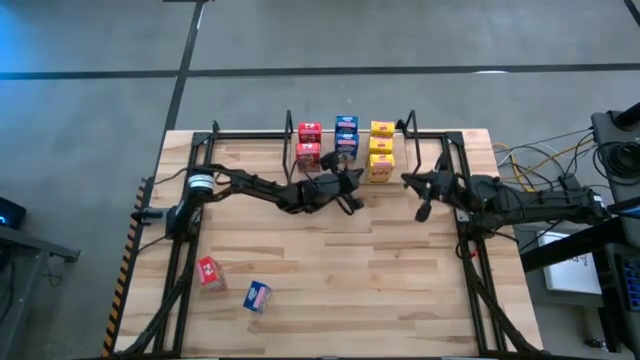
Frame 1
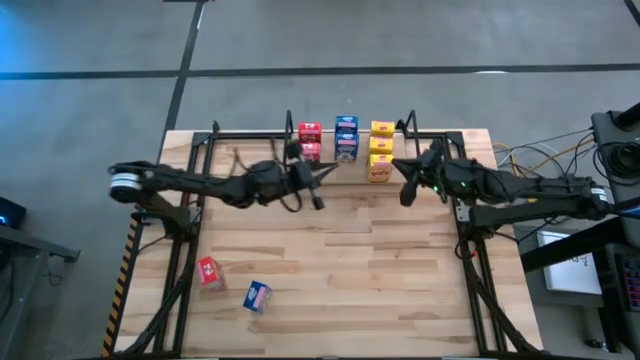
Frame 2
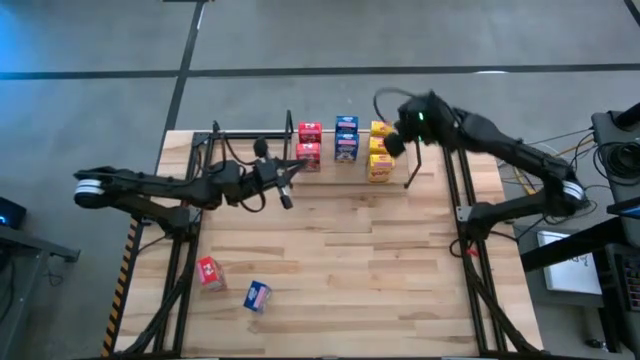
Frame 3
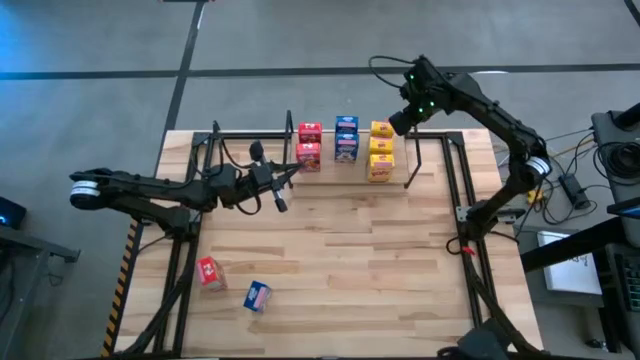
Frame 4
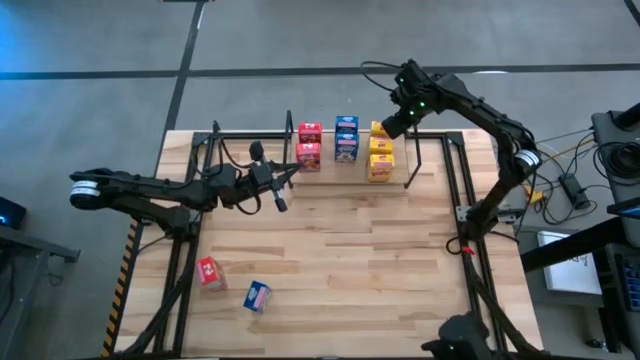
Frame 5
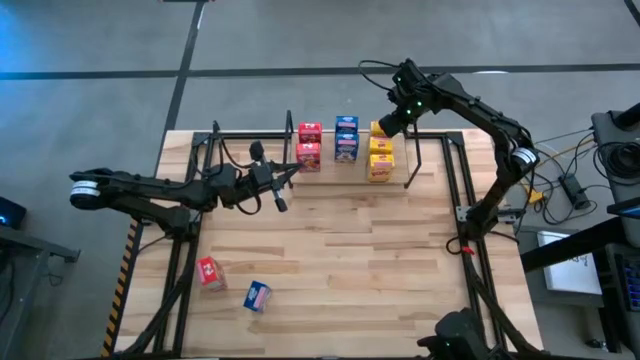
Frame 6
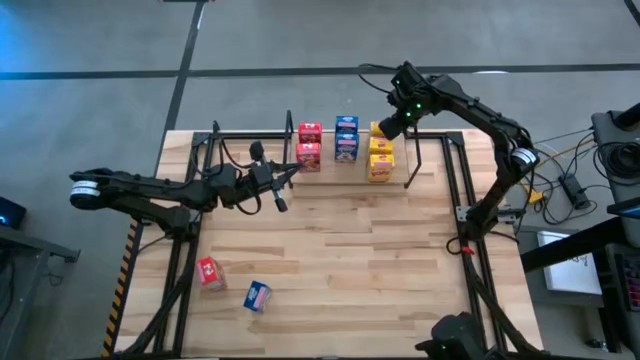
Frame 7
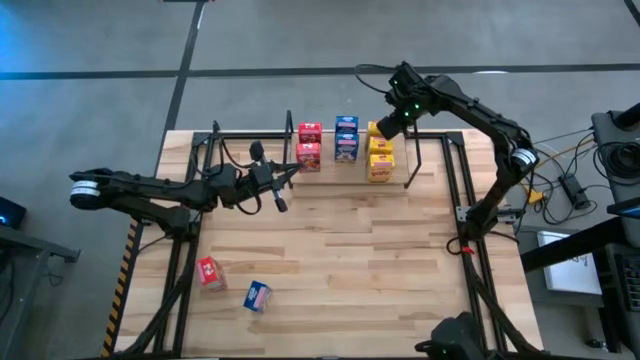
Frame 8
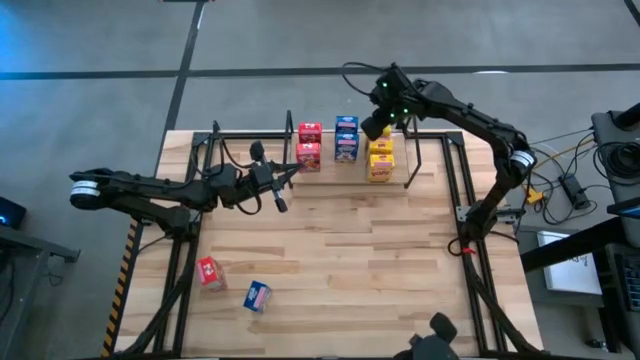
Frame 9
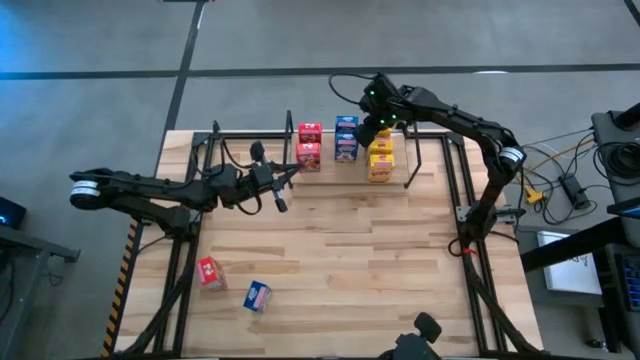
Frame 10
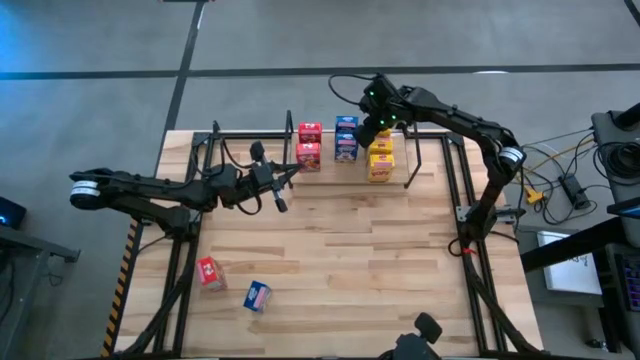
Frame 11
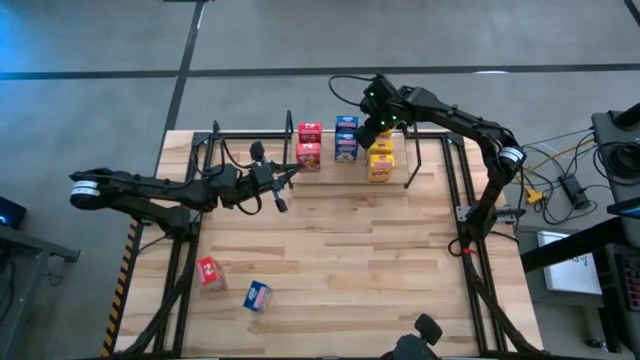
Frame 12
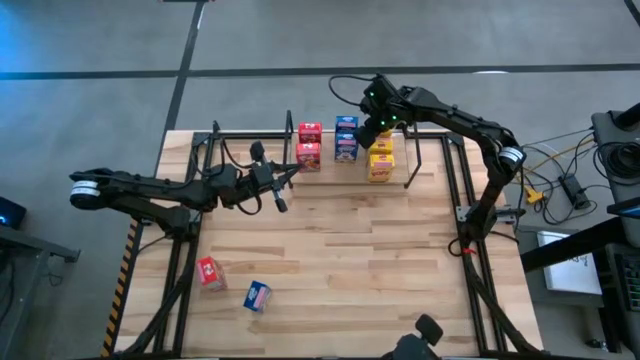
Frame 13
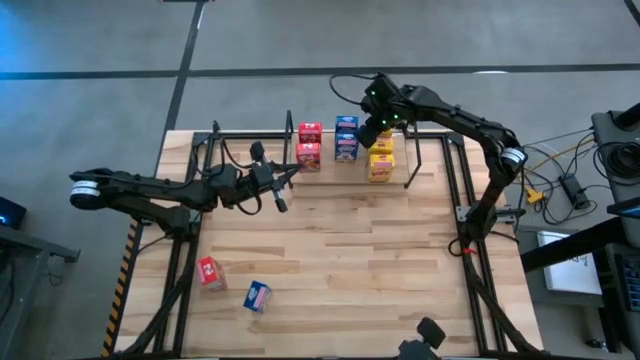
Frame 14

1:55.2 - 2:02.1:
Task: Stack cereal on shelf
Adjust the top yellow cereal box on the shelf

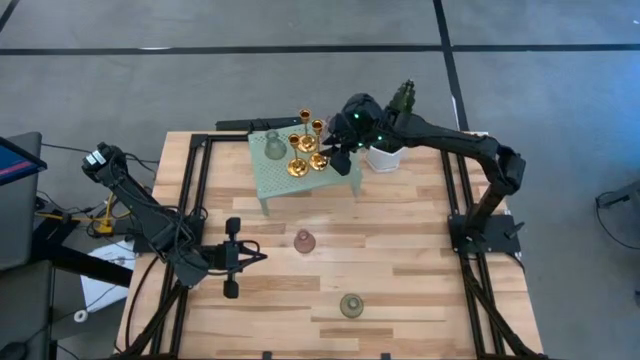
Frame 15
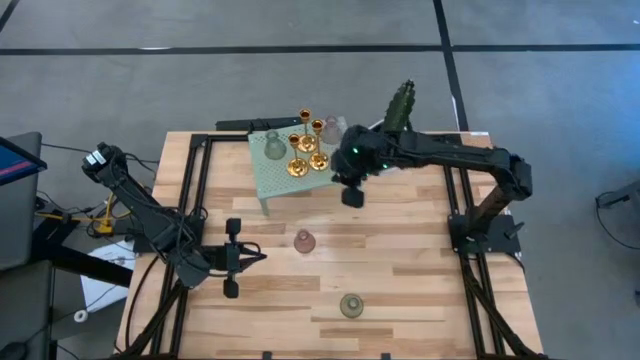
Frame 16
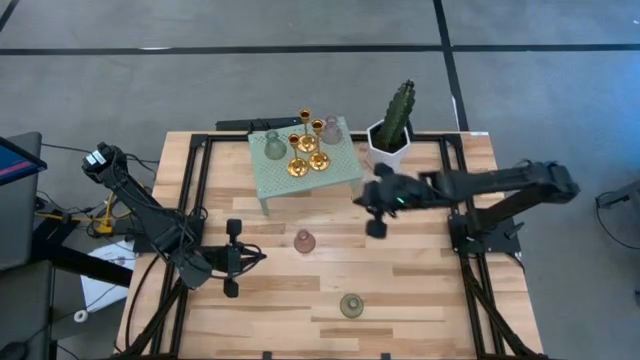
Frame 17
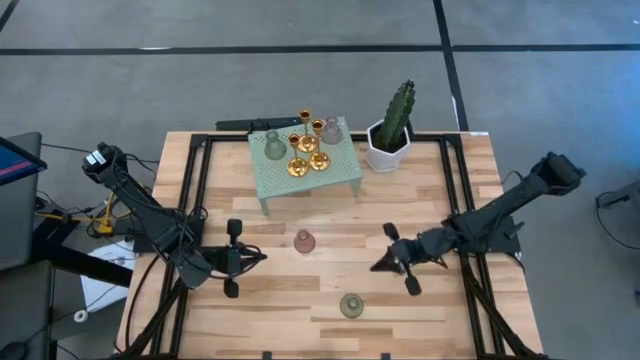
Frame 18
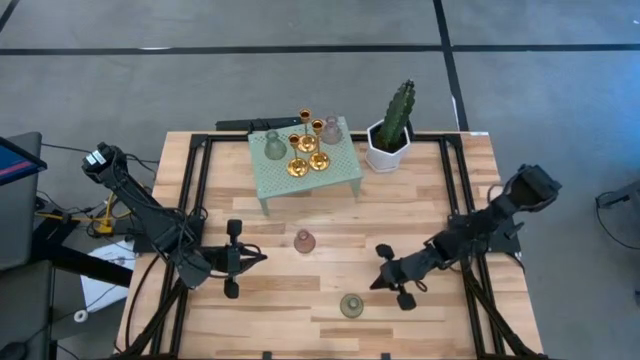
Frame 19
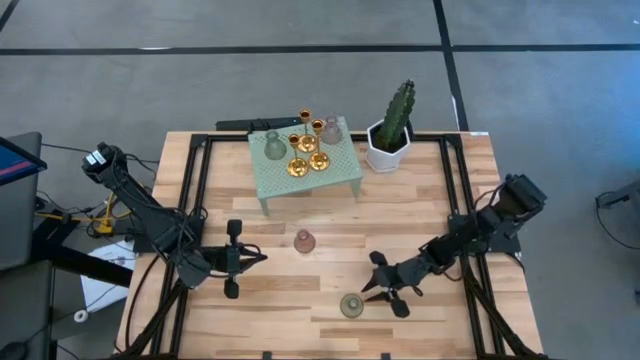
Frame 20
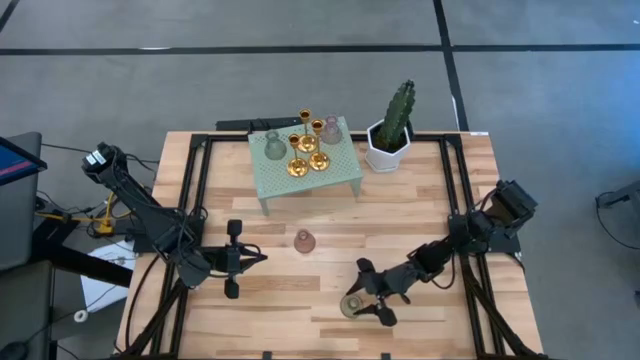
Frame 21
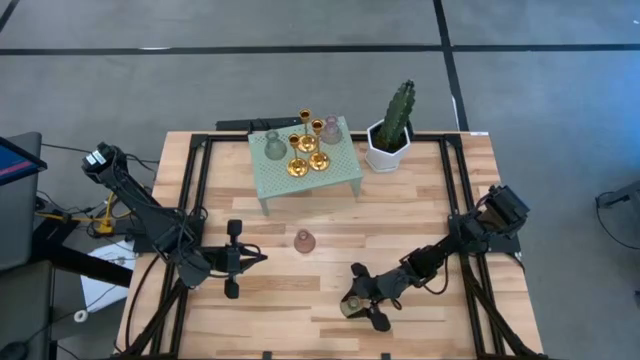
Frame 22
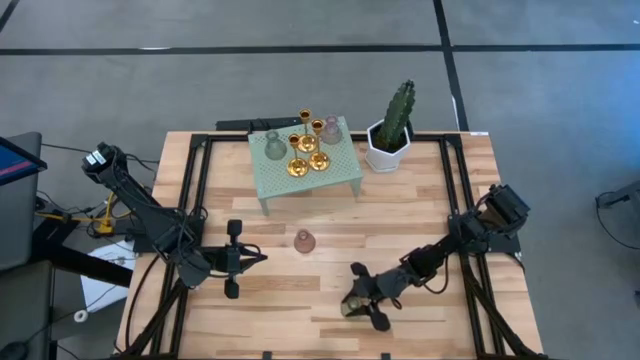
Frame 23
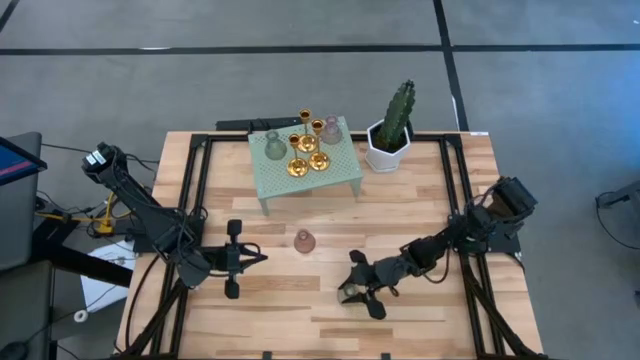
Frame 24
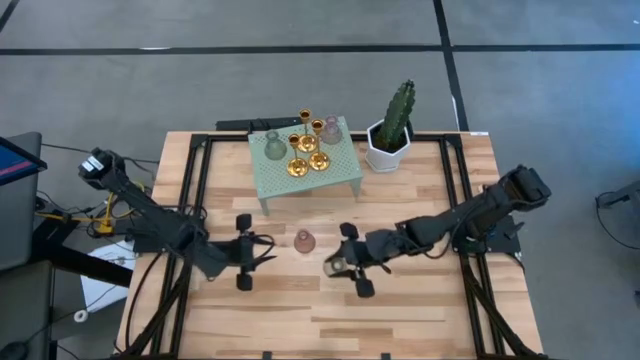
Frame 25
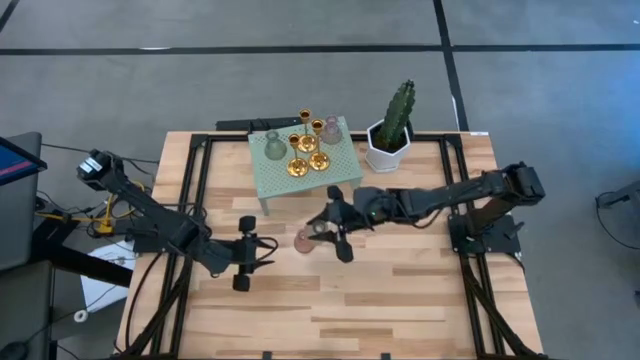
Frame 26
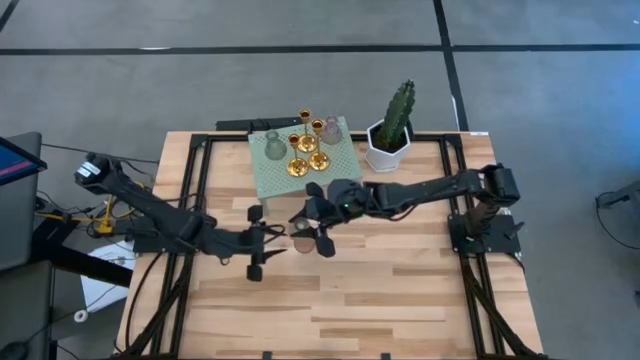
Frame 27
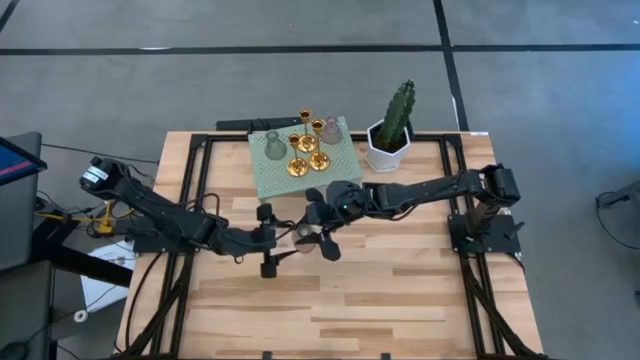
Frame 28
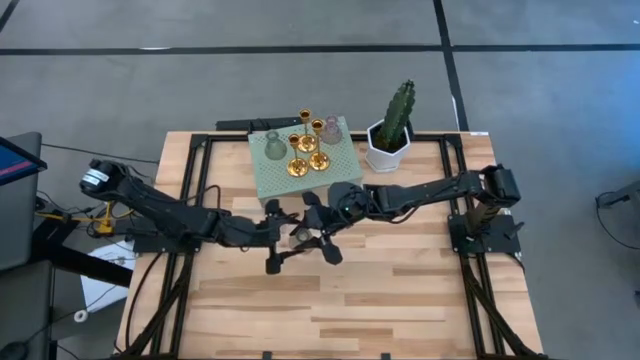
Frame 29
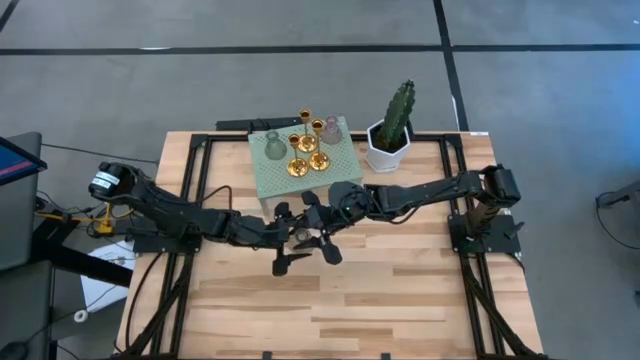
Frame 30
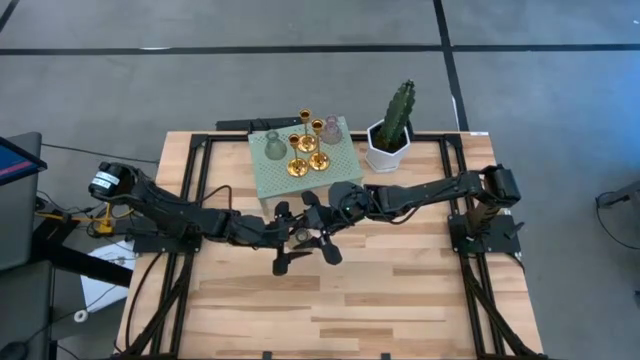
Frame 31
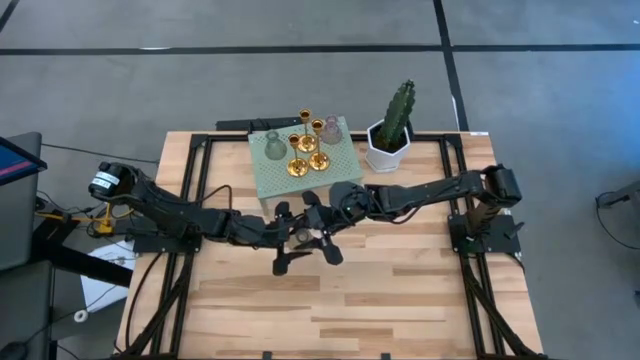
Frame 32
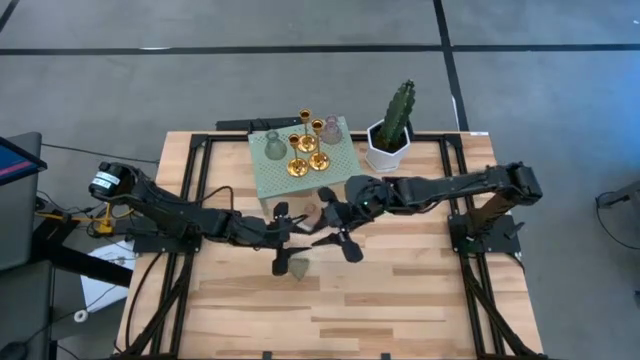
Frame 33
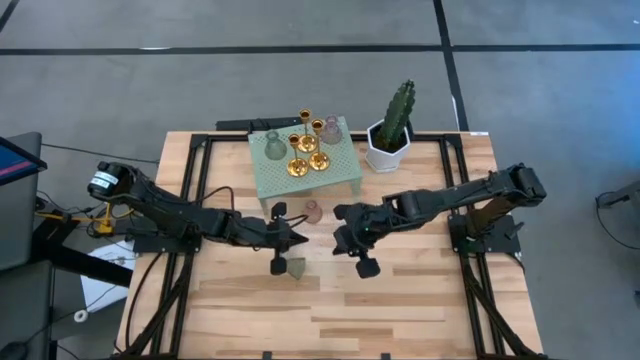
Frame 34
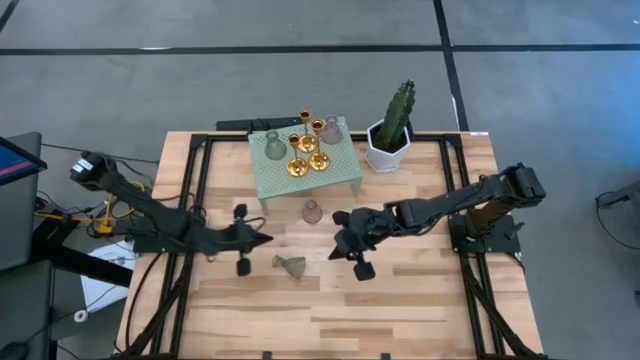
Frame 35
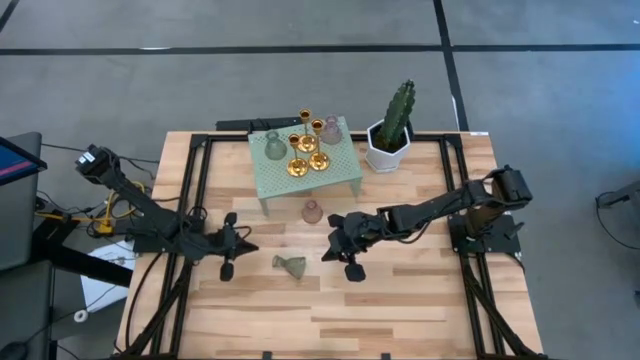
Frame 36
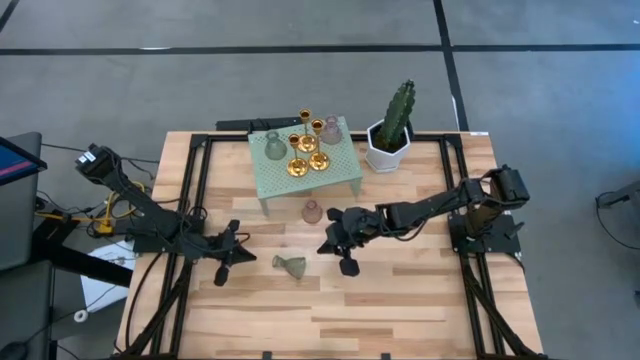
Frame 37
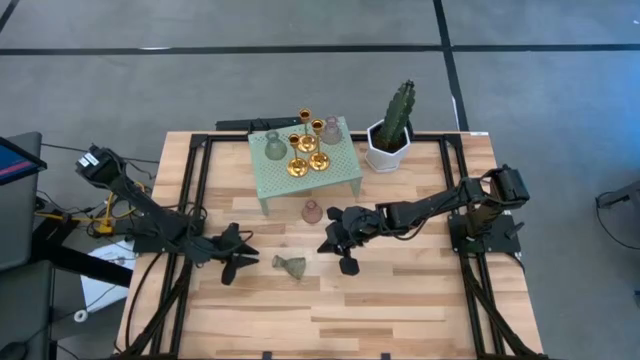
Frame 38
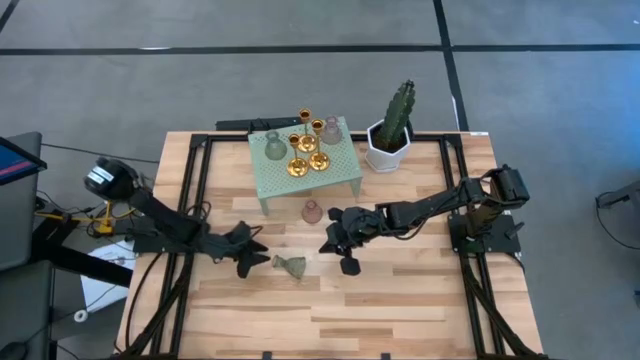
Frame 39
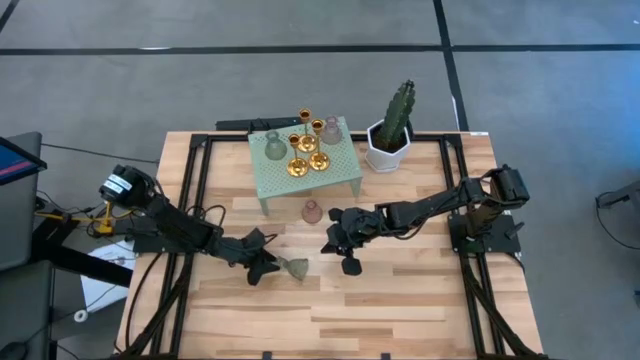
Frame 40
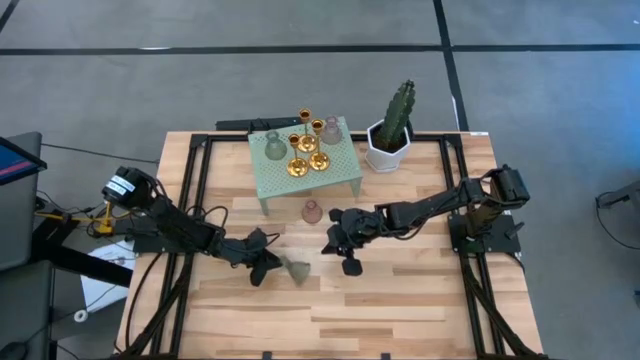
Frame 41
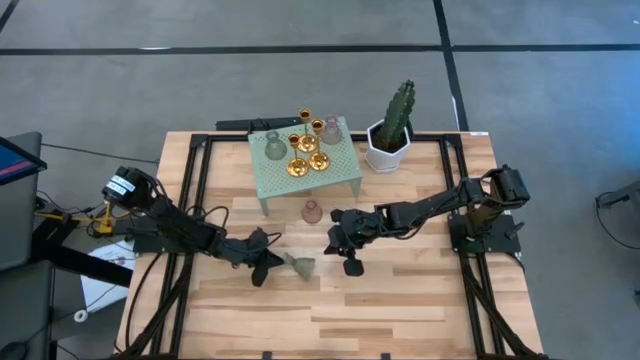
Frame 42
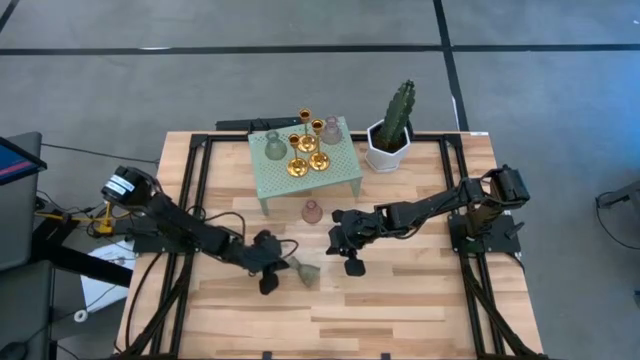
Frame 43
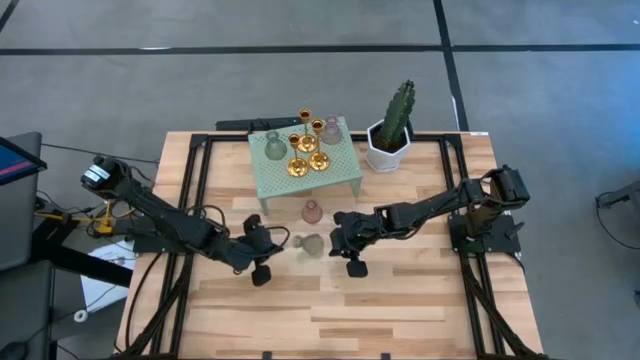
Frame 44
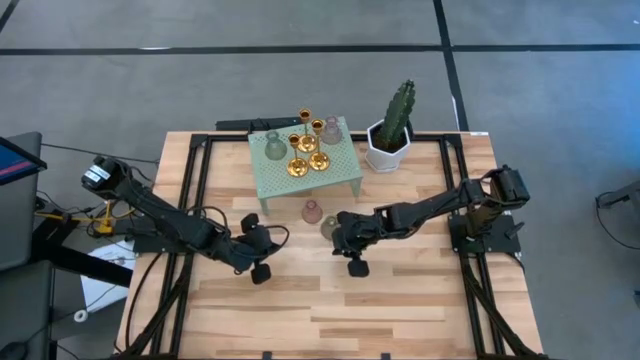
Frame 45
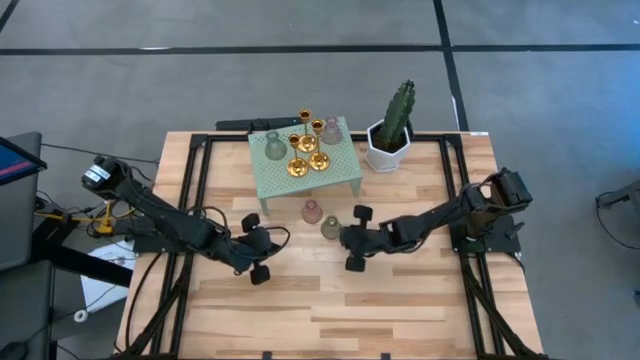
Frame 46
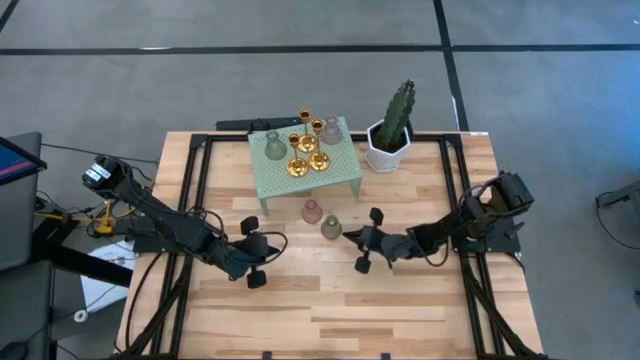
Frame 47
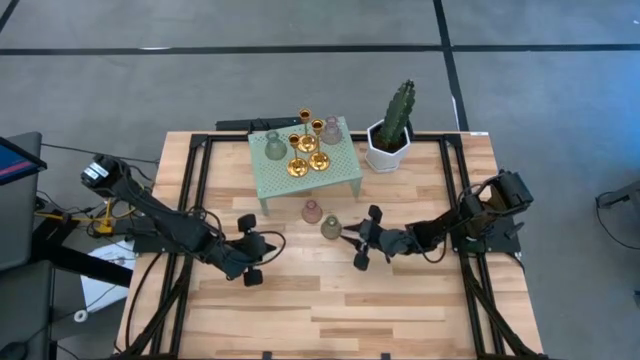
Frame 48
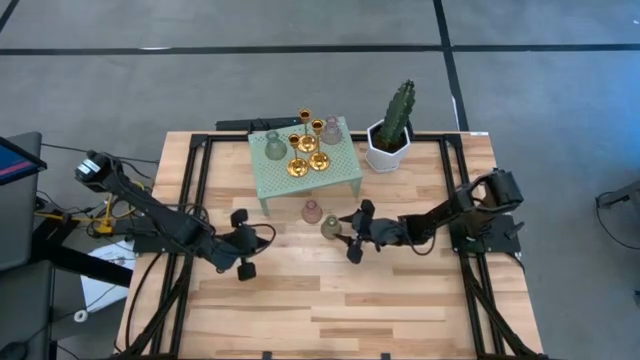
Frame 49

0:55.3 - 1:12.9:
Task: Pick & Place candle stick holders
Put the green glass candle holder on the shelf
